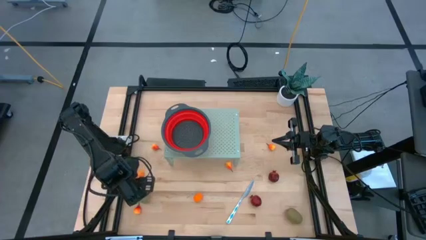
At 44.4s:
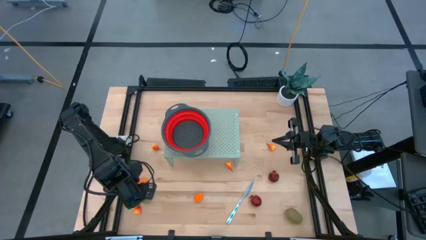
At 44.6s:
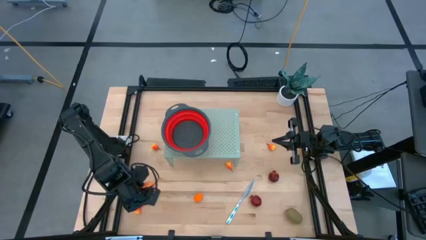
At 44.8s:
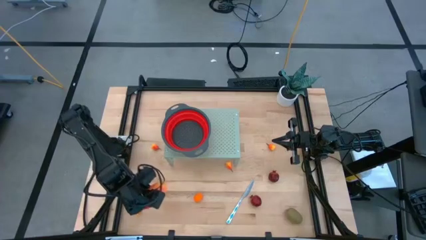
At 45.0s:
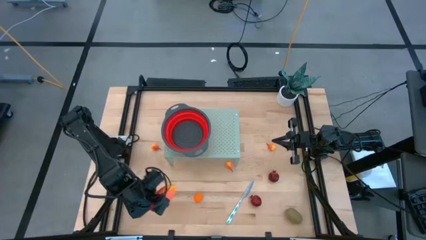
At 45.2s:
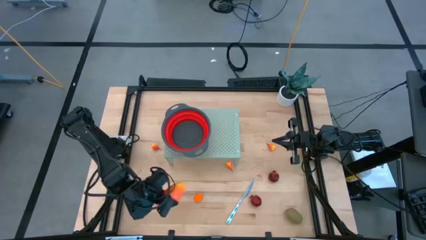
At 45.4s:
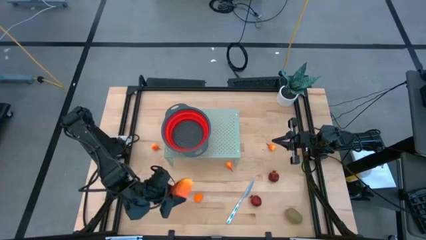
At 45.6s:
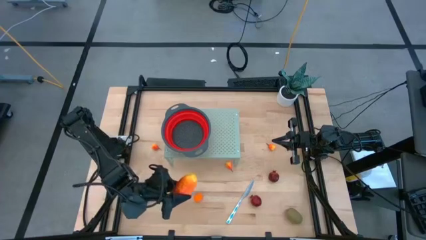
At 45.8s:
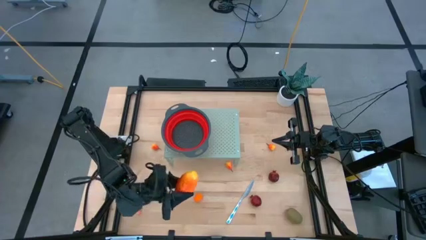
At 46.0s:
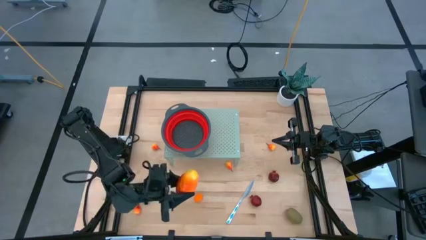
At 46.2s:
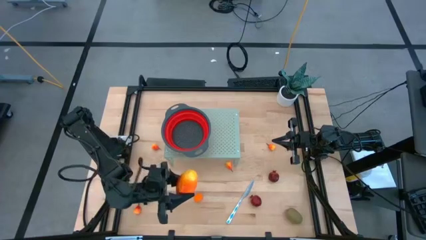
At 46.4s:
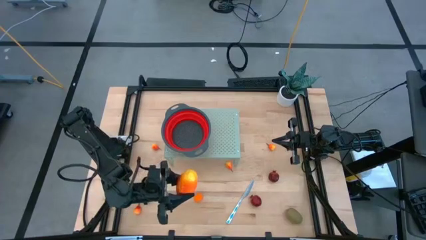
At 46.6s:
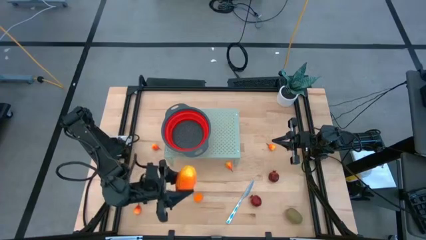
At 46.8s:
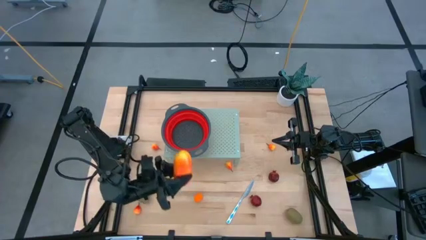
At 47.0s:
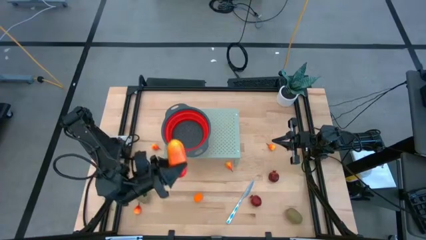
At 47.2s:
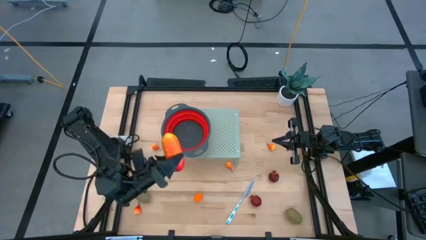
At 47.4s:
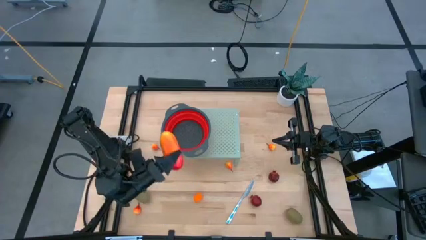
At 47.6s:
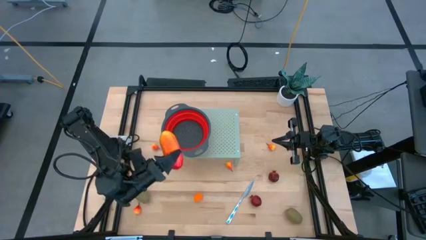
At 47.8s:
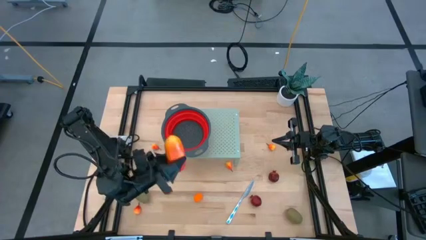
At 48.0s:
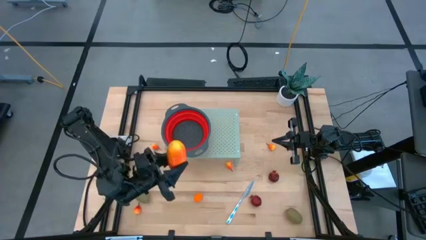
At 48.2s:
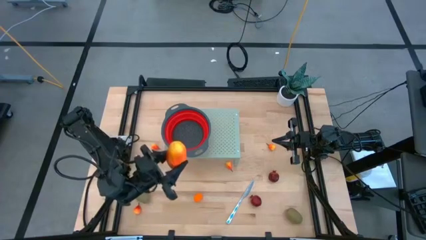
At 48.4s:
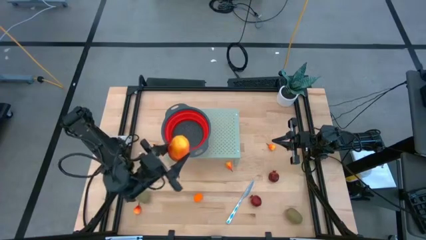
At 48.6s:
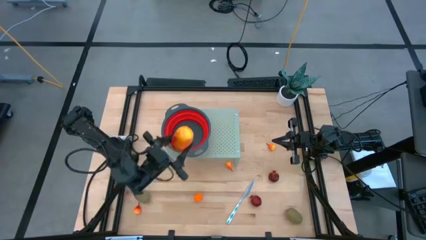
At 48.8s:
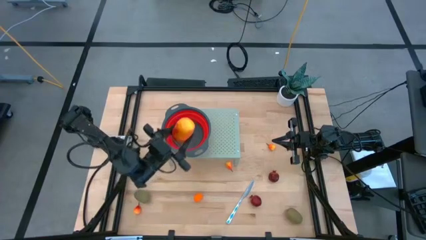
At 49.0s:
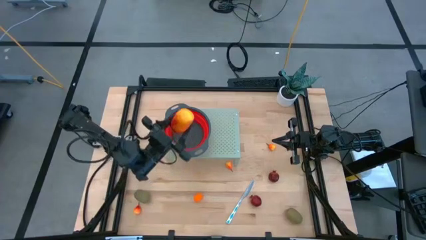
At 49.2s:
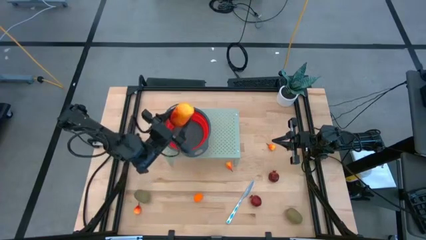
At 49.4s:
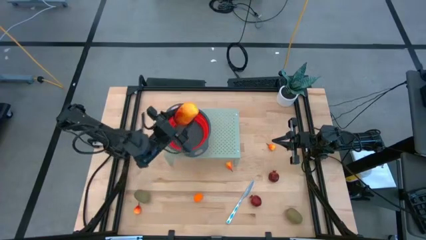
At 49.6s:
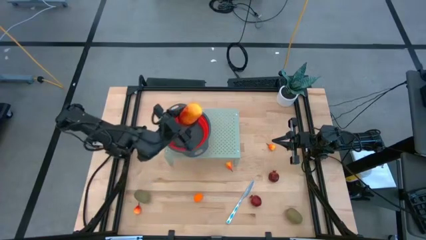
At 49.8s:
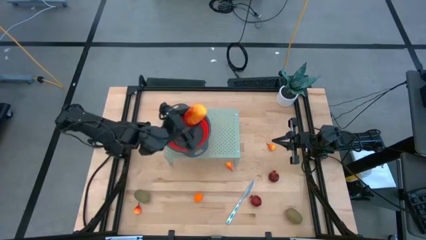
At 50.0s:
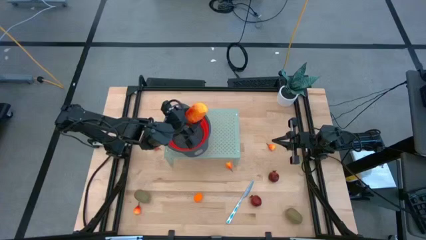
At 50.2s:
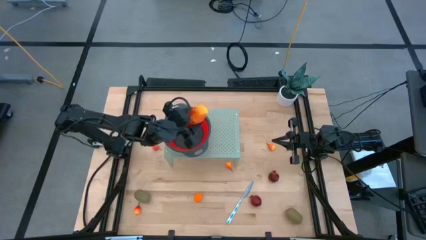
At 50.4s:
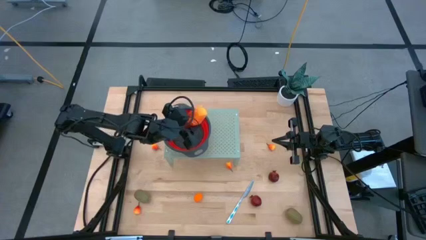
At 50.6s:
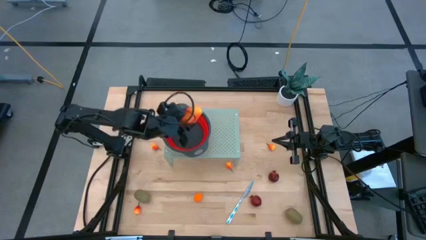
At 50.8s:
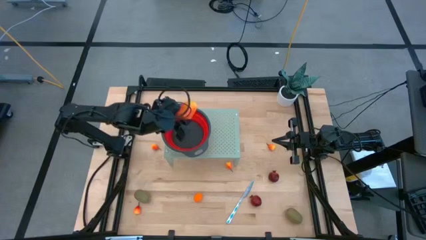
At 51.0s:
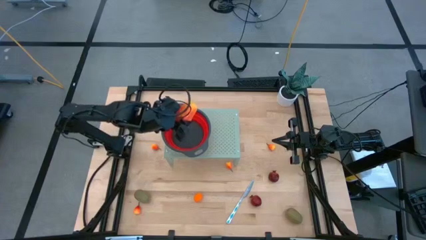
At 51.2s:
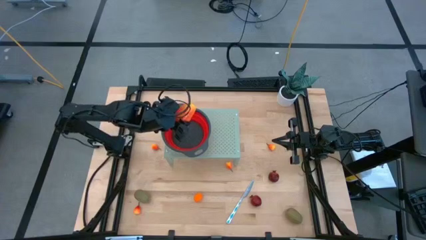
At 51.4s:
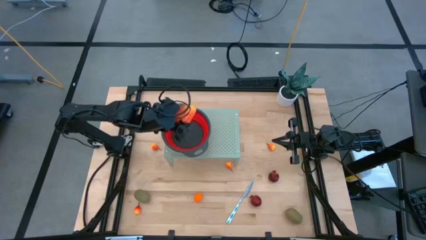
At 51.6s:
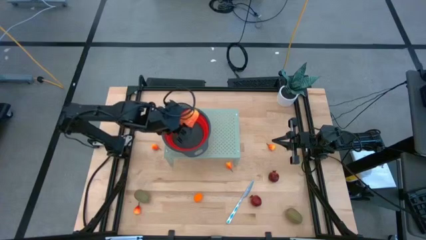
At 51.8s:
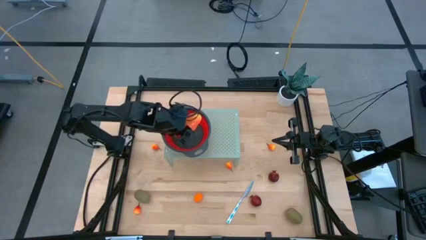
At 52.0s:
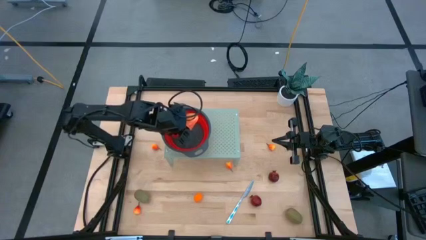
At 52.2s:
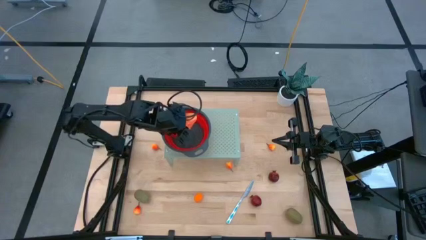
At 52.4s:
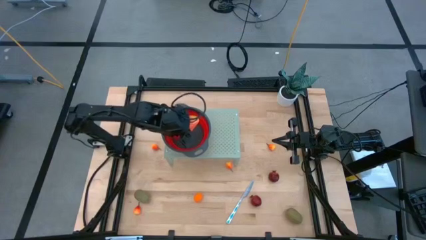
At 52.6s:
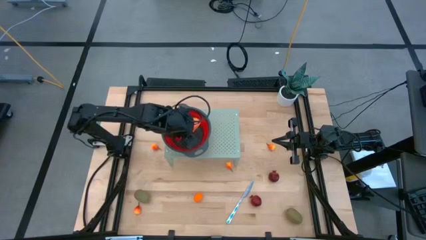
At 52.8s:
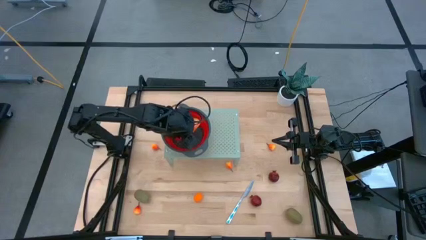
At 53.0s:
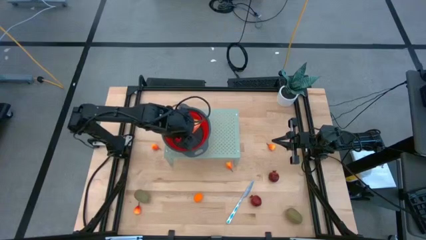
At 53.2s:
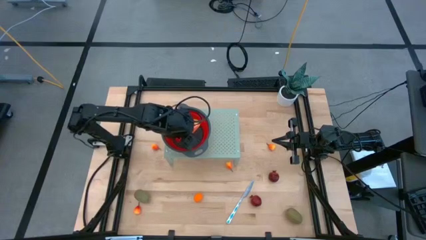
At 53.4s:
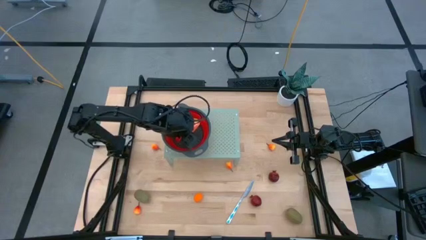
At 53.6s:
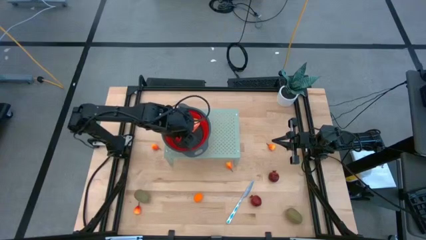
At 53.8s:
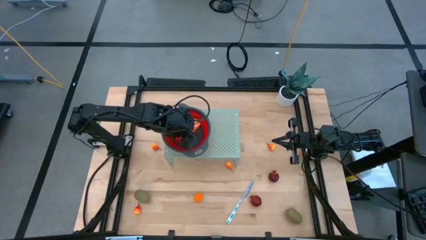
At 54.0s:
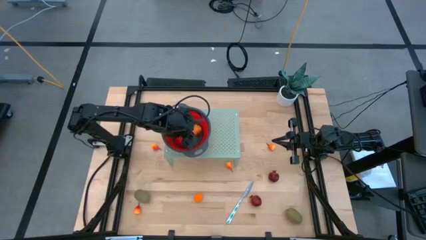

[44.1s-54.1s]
Task: Pick & Place Fruit
Put the red mango into the red strainer bowl on the shelf

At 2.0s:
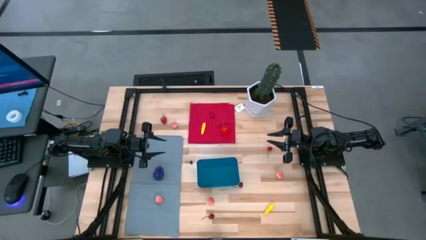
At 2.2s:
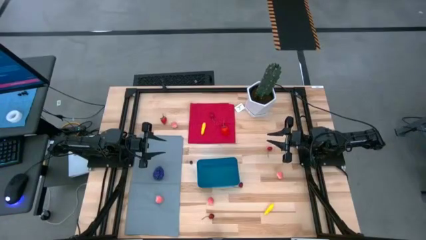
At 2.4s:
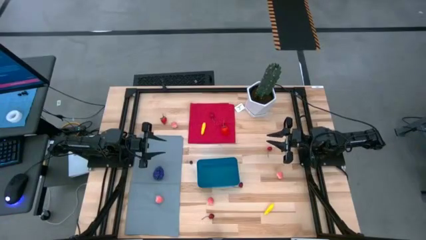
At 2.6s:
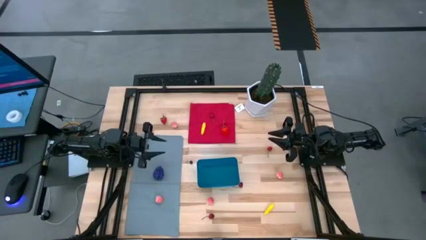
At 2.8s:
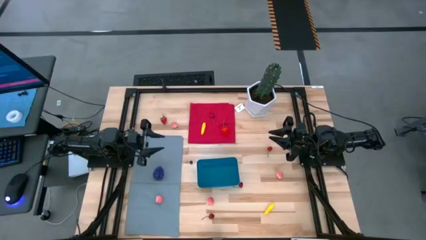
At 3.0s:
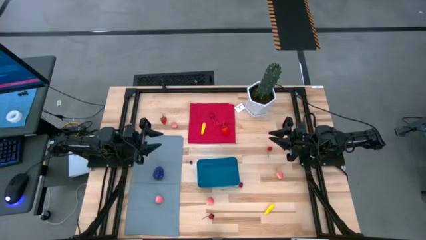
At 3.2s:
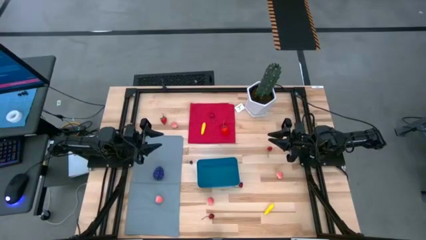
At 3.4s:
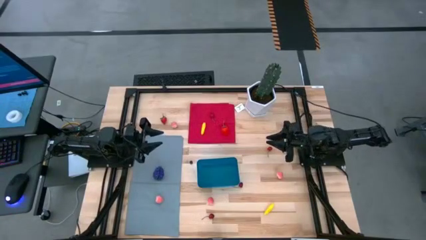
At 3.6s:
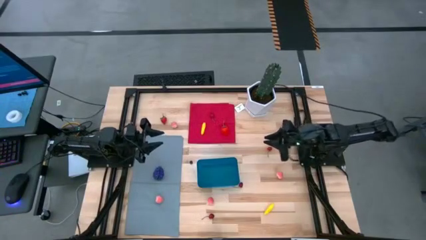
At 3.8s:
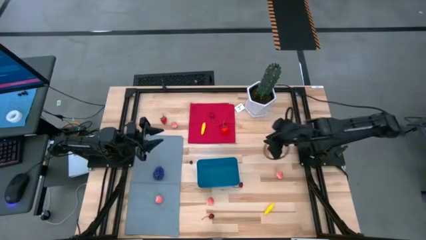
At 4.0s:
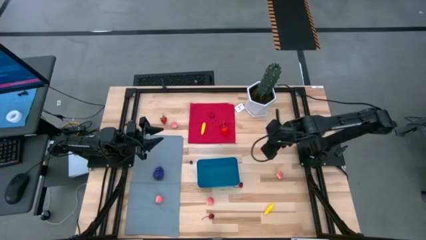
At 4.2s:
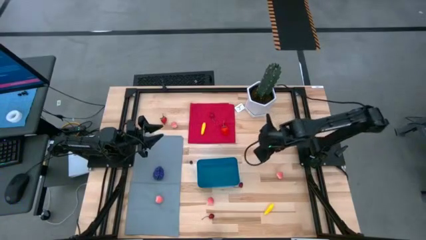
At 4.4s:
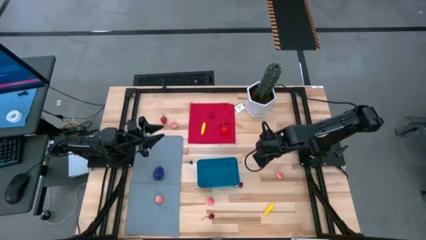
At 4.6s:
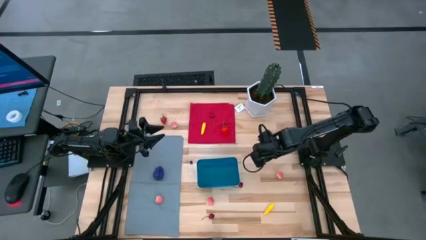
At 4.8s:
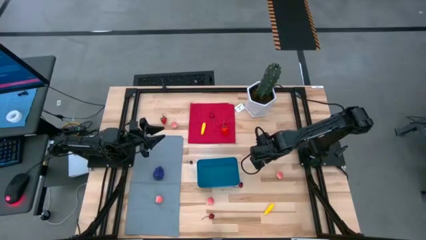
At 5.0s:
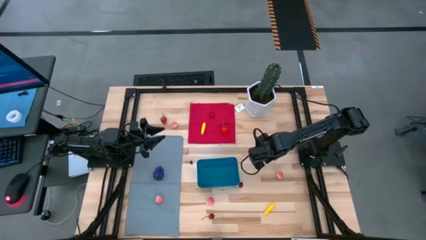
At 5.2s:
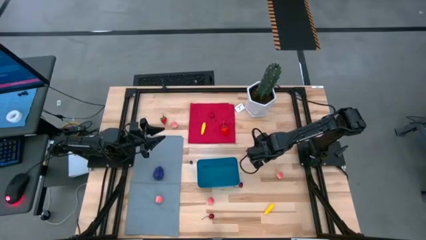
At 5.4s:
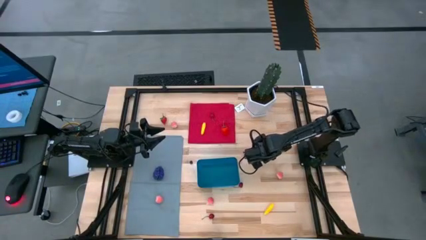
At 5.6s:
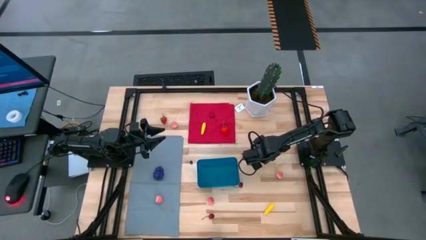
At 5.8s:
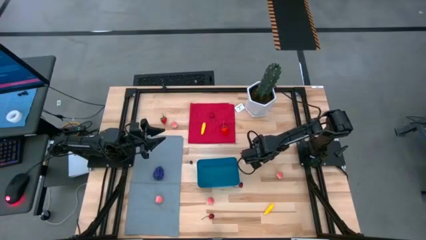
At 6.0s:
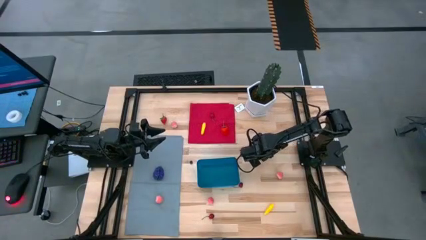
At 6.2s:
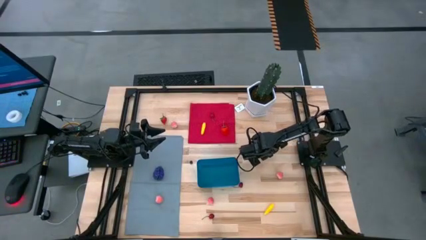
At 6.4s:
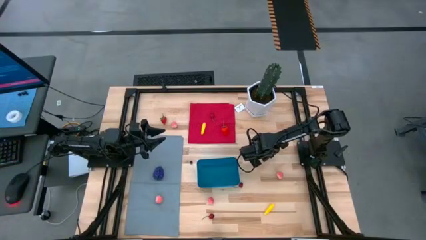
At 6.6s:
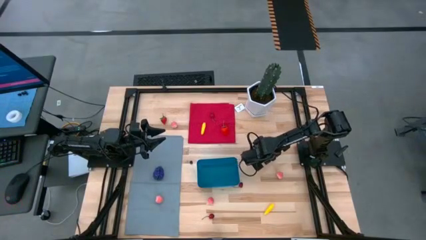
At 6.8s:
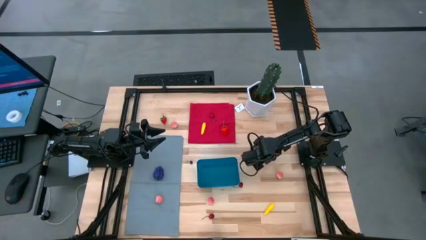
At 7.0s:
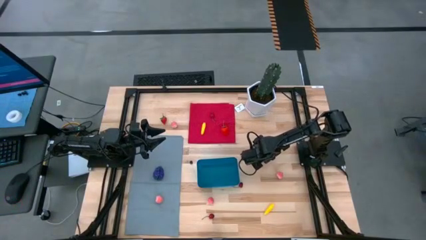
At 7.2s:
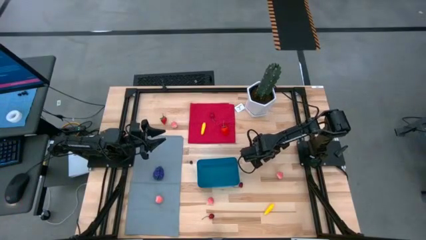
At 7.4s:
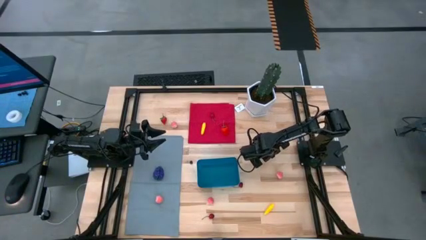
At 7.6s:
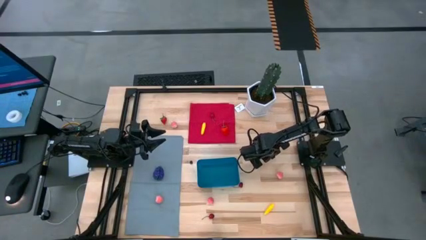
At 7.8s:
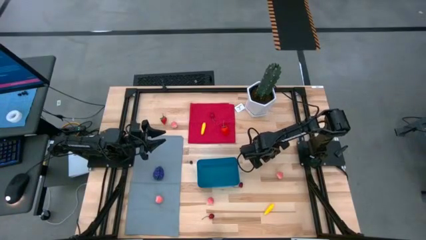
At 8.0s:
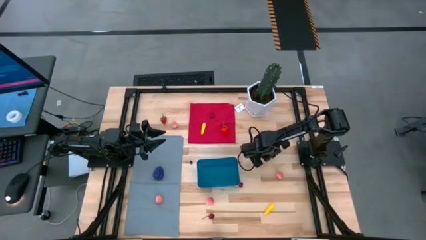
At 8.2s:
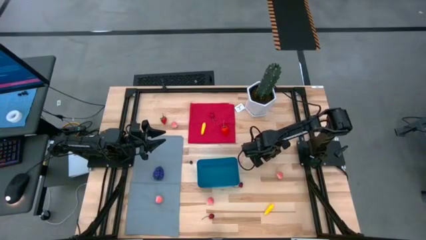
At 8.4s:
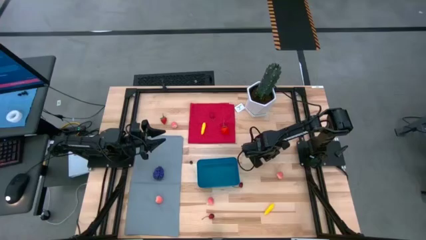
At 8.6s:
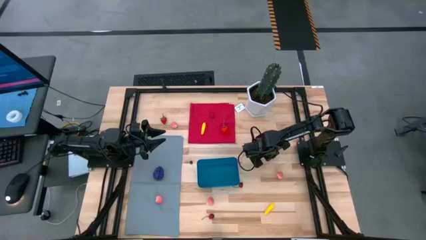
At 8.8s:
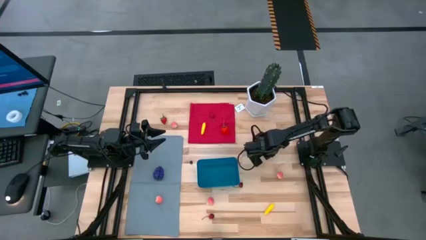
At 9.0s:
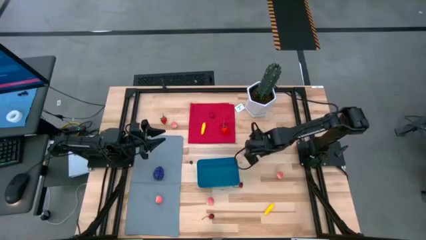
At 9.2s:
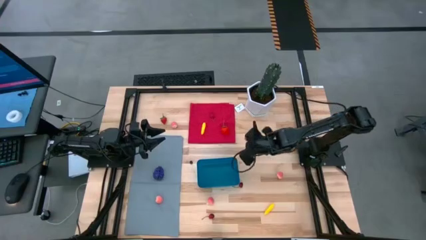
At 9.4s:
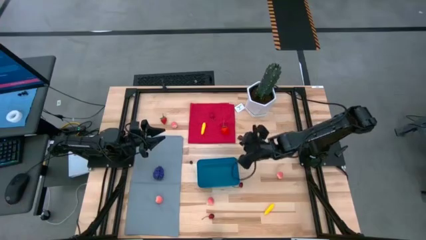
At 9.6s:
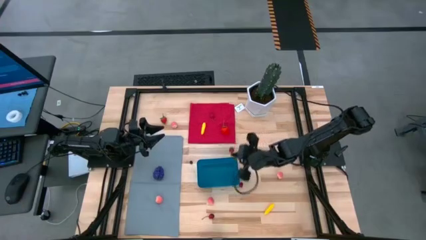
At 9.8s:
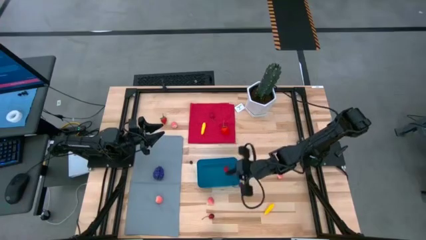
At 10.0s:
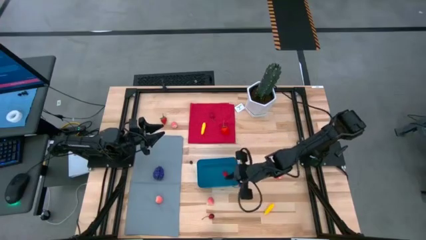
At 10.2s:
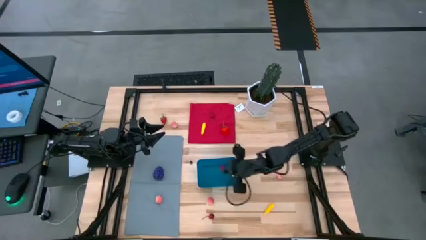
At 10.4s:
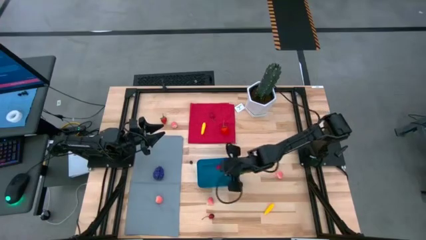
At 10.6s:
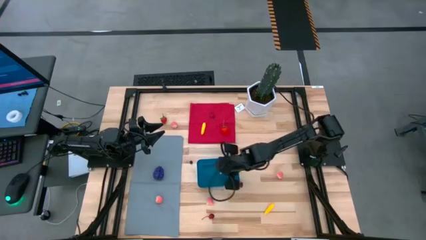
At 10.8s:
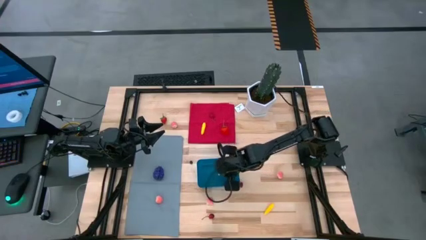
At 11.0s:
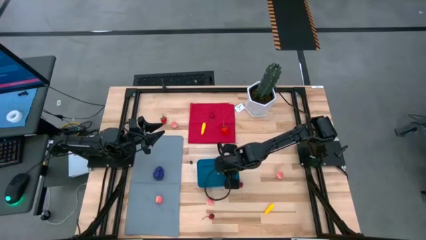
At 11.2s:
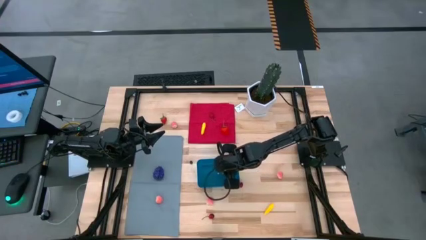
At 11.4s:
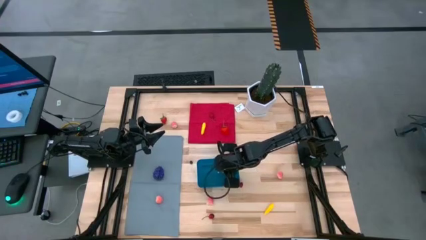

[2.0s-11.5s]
Task: Pick and placing Produce into tupperware
Put the cherry into the blue bin
